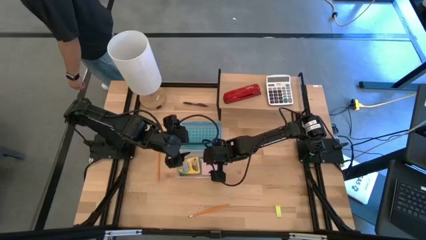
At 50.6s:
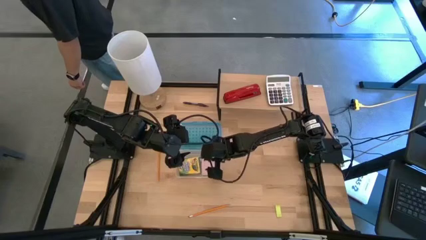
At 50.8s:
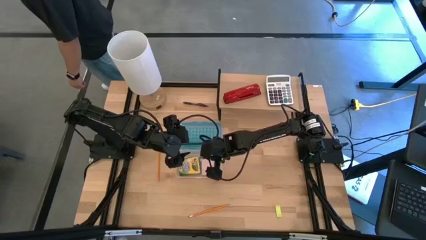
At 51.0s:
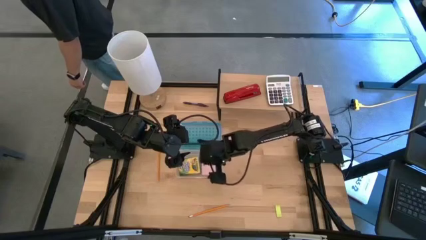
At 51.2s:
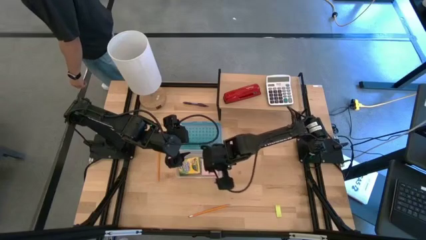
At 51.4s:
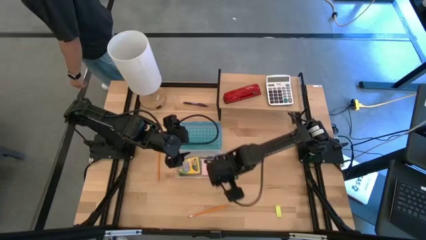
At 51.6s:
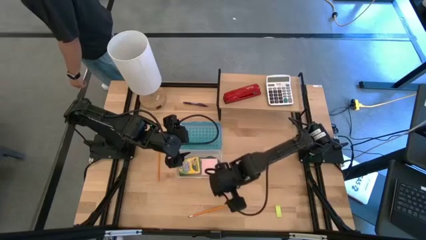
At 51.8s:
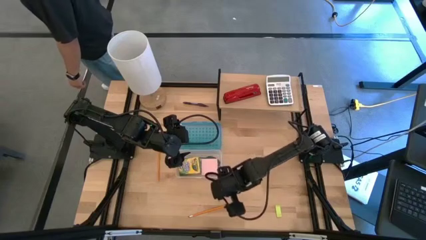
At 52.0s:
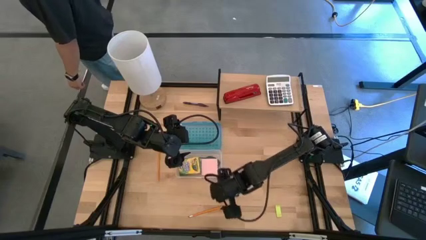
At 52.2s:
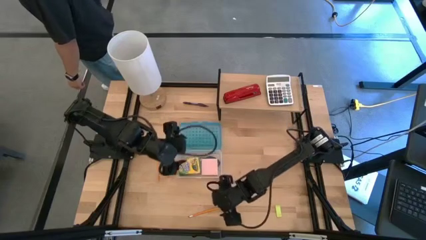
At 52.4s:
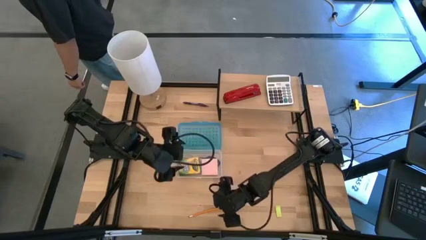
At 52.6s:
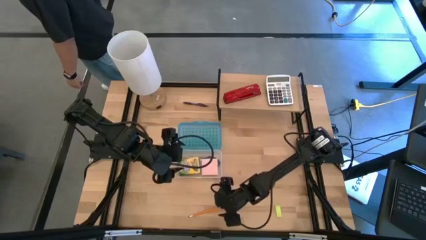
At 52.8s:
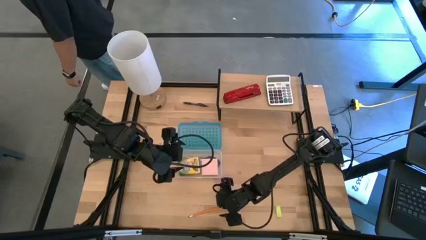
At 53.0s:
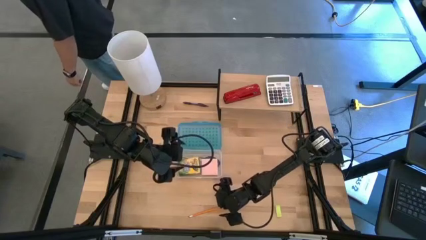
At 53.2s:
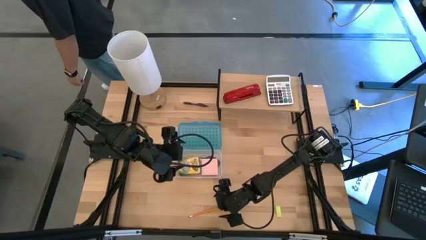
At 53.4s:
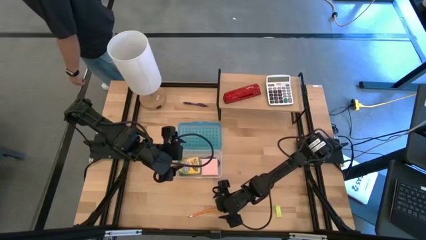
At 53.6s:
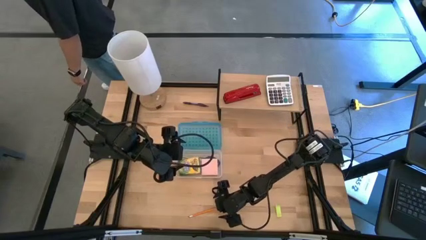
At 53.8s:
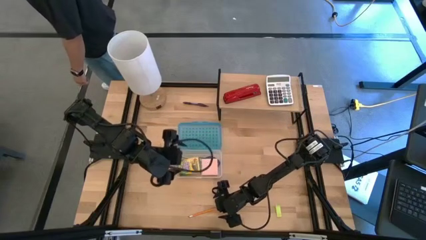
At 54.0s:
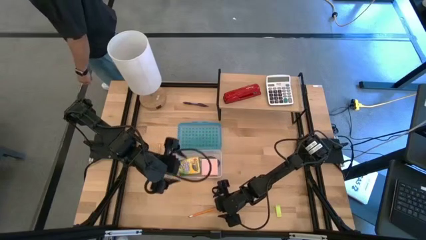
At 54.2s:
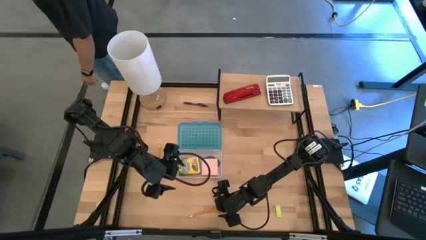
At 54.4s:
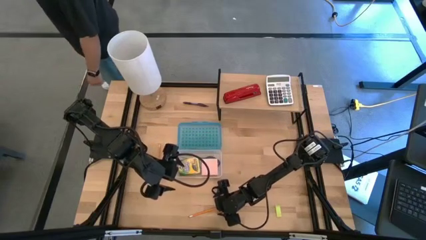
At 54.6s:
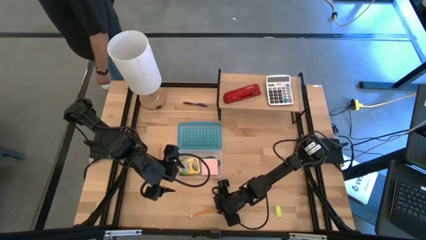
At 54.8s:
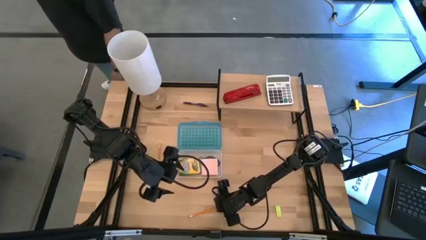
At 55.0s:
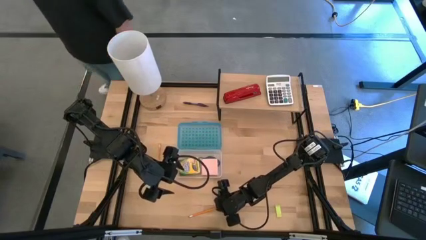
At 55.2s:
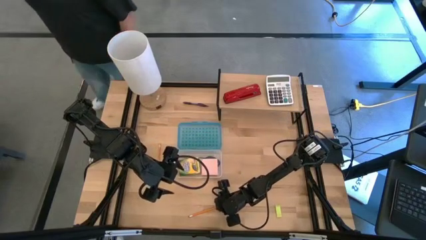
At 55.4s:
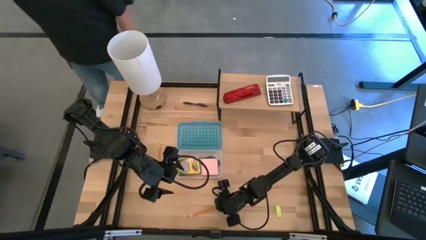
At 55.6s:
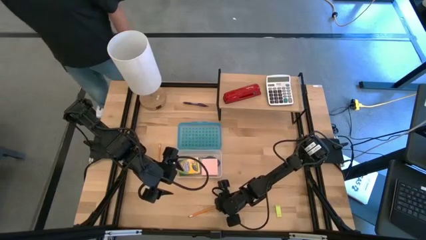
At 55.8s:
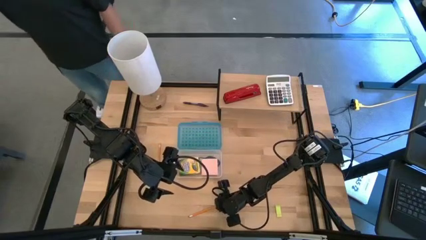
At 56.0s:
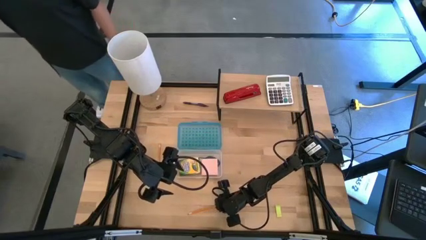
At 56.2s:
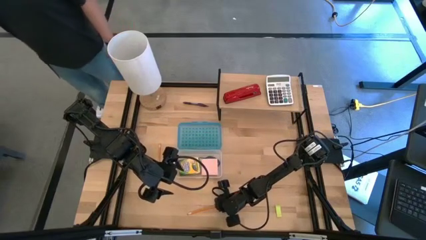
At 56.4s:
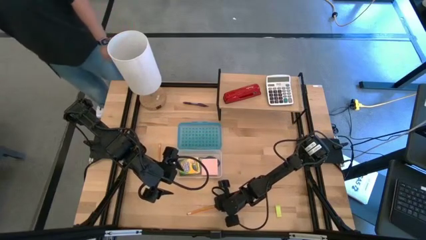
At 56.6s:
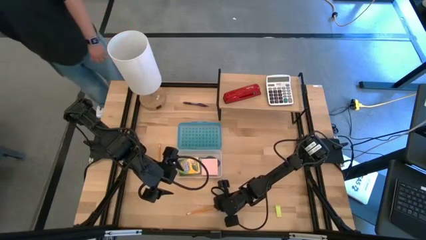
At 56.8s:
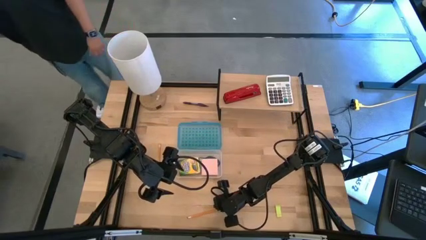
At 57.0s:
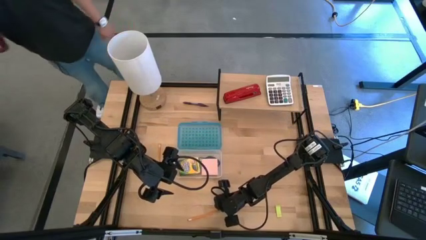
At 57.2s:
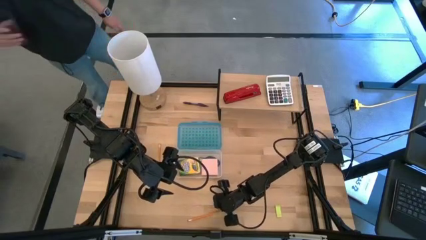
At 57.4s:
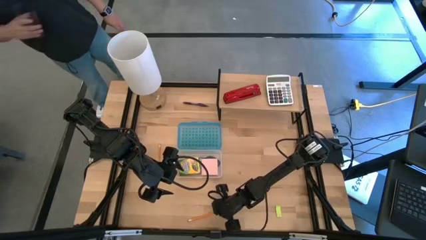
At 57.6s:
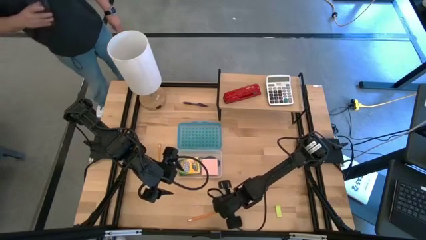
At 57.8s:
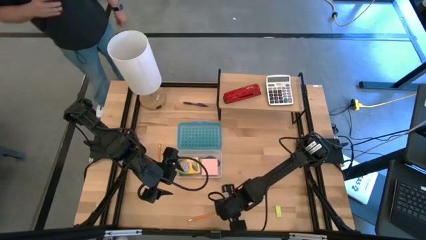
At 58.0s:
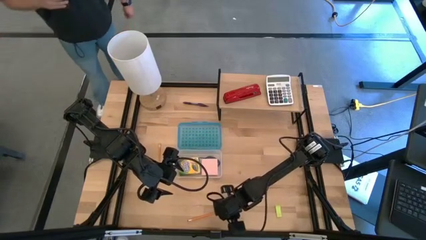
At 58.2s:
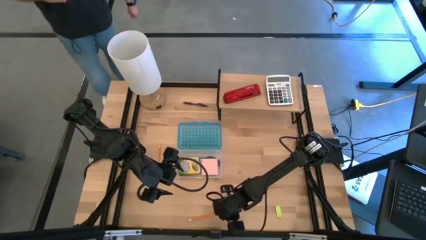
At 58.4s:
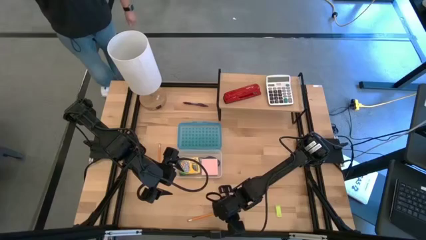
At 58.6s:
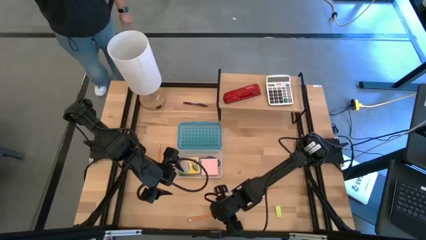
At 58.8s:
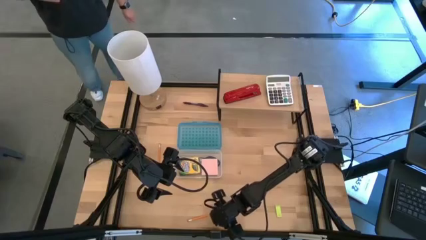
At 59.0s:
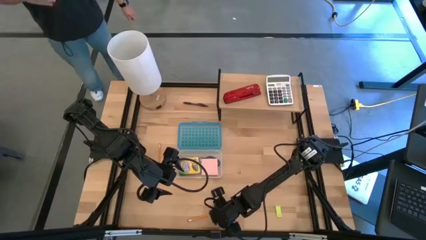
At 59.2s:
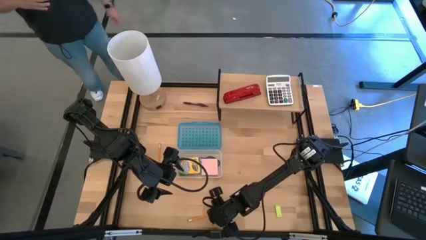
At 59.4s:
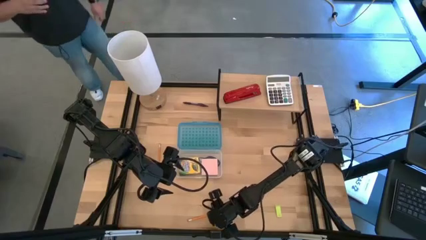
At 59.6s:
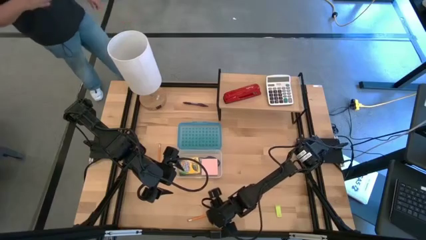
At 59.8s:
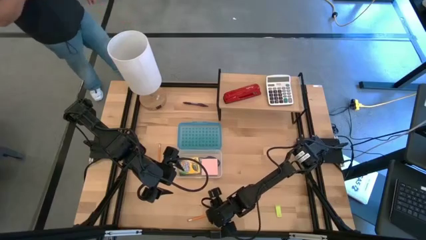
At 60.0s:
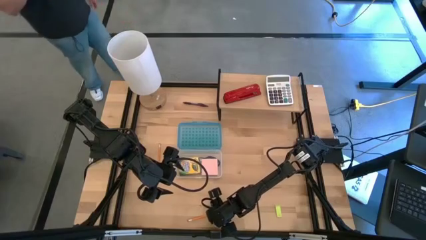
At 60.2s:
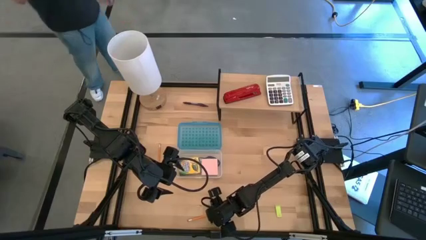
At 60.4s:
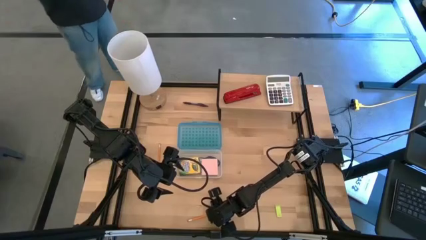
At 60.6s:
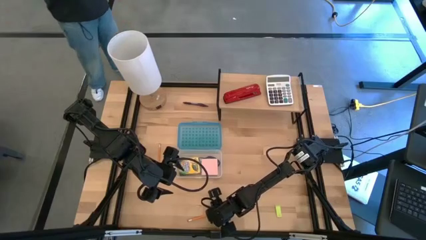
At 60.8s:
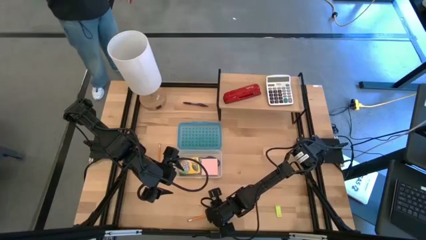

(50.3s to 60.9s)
Task: Pack school essentials
Put the yellow pencil into the blue supply box

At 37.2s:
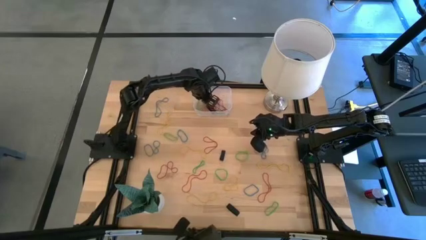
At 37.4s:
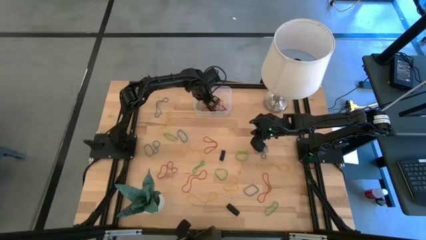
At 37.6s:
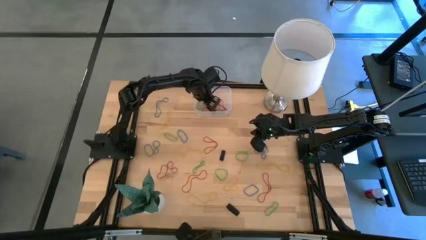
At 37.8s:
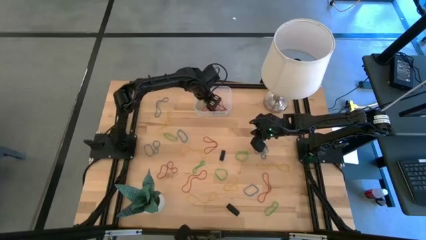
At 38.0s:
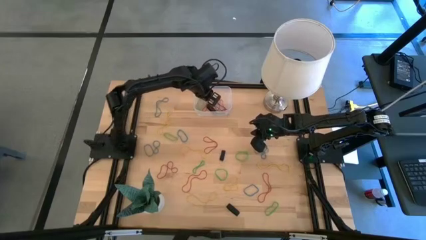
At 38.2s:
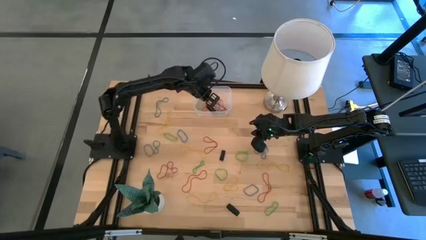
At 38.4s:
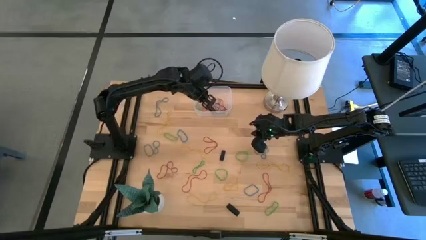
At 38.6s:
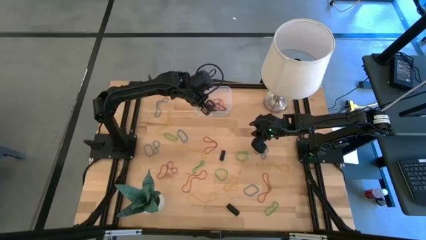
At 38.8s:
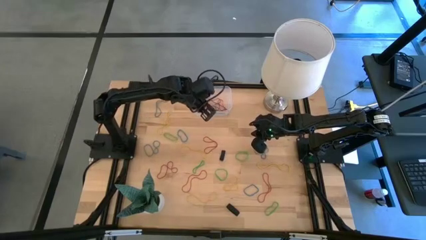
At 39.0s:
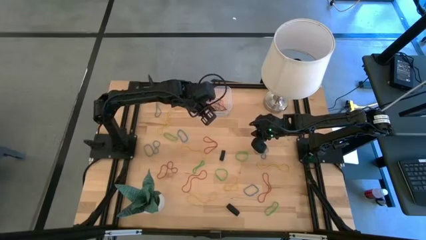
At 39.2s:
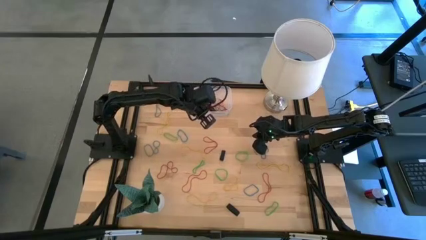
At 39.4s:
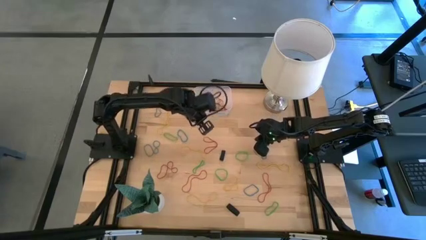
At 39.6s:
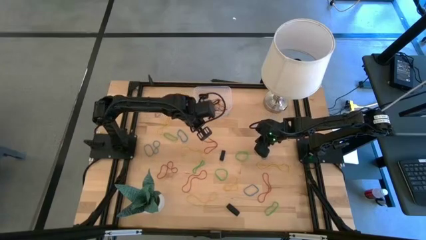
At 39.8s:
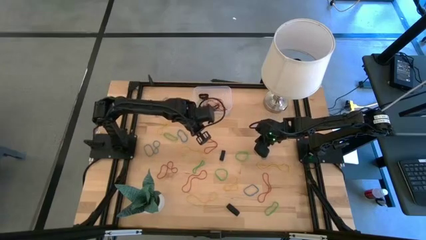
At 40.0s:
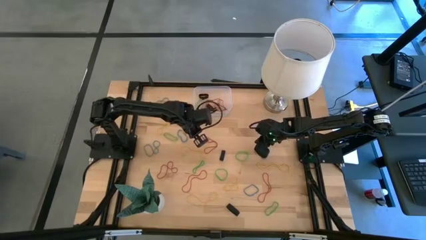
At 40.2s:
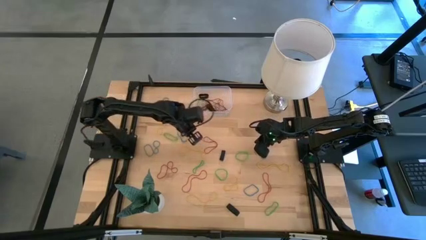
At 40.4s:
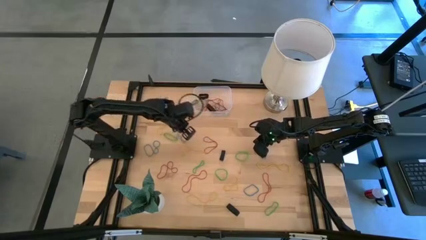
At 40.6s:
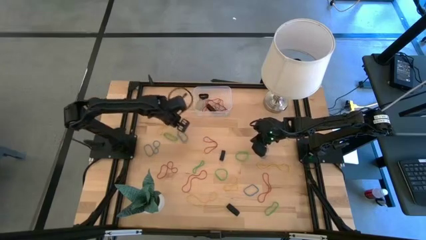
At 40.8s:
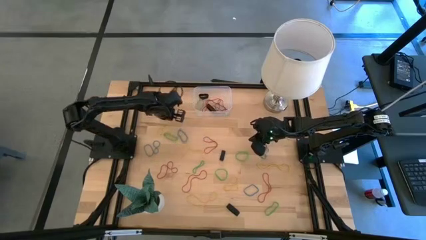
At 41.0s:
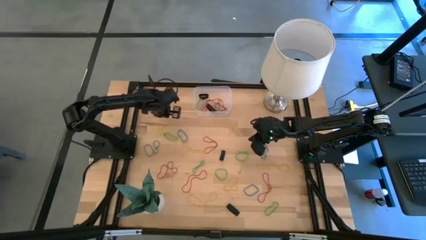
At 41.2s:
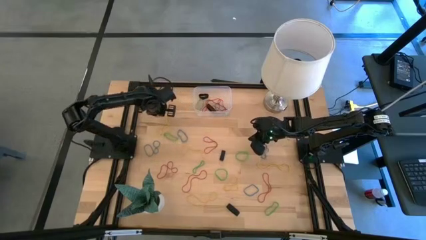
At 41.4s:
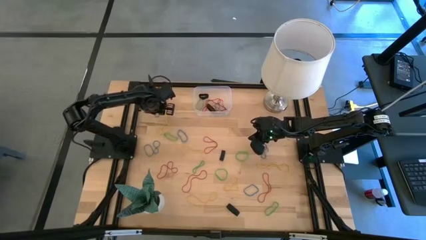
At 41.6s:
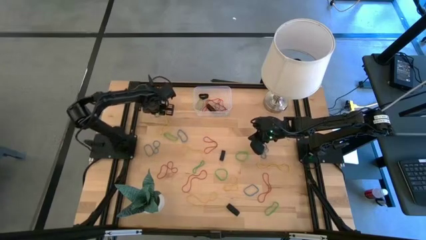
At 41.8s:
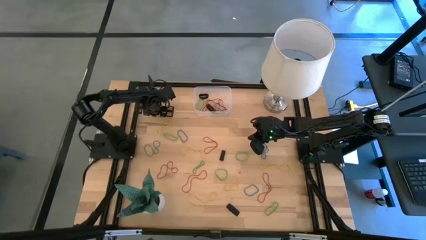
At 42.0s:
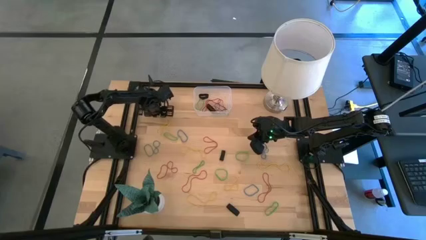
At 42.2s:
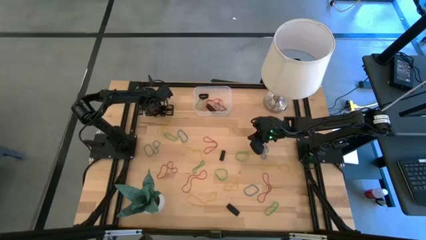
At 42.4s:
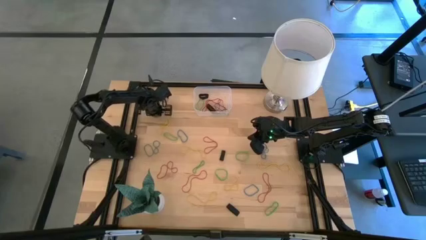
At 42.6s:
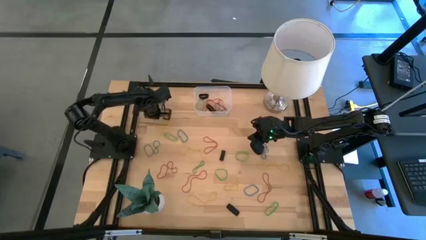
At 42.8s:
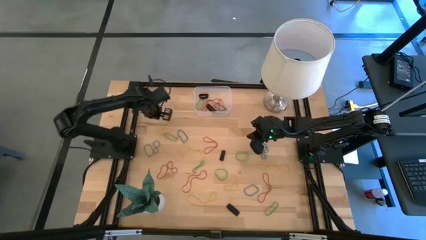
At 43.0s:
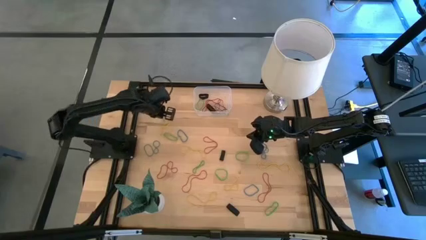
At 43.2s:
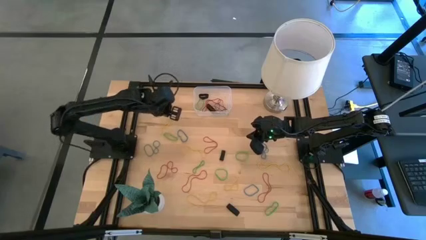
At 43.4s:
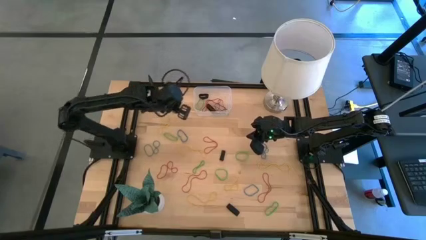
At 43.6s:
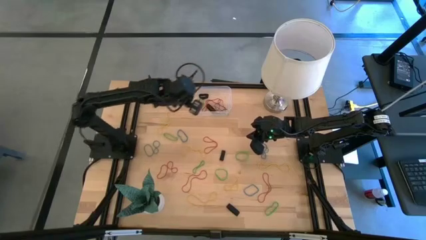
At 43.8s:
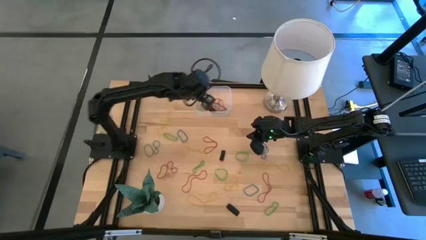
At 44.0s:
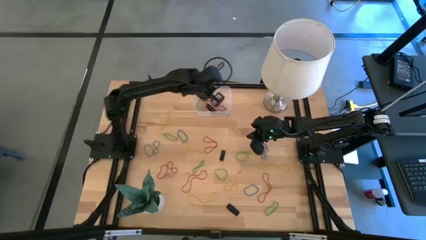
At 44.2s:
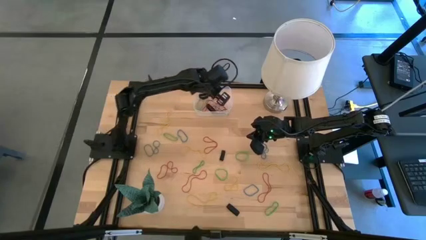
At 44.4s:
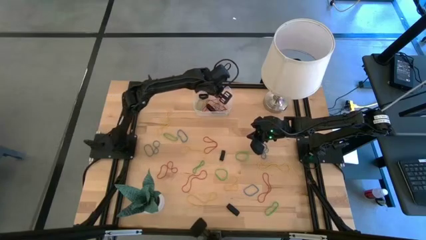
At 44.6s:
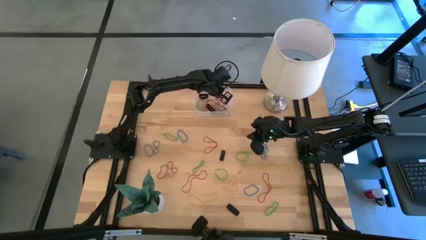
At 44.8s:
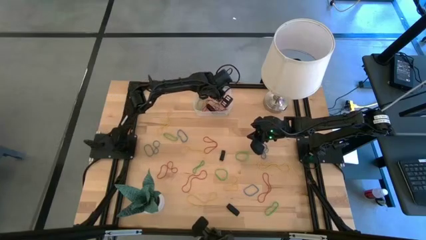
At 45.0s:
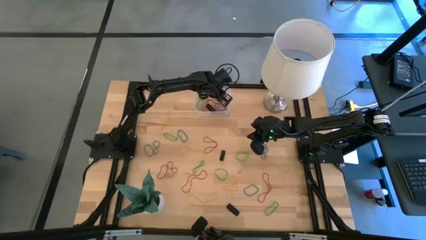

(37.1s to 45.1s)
Task: Pick and place rubber bands into bin
Put the blue rubber band into the transparent bin
